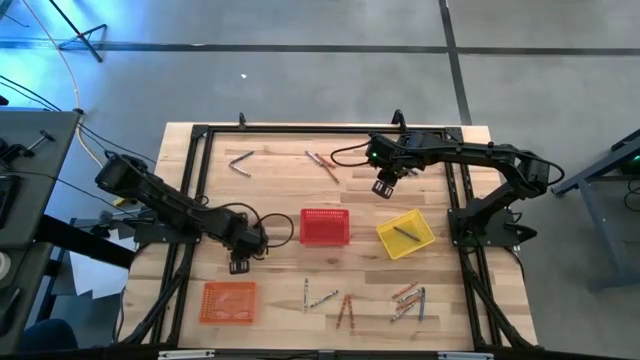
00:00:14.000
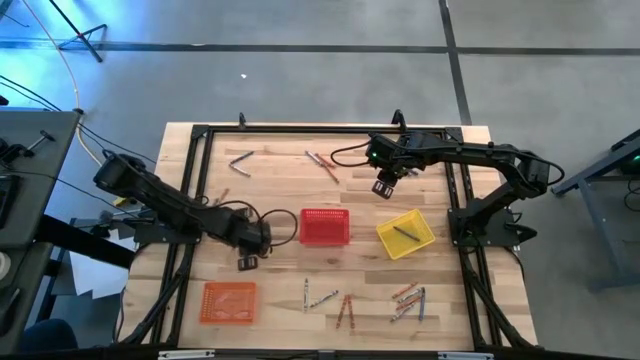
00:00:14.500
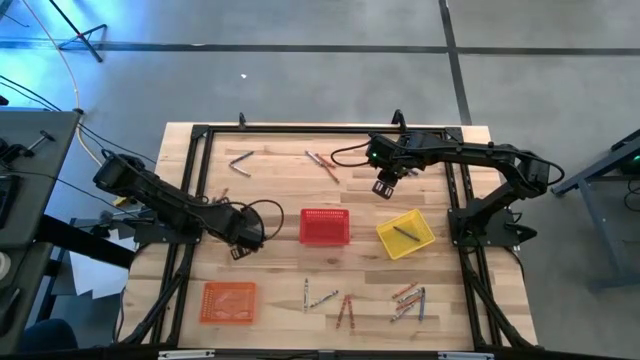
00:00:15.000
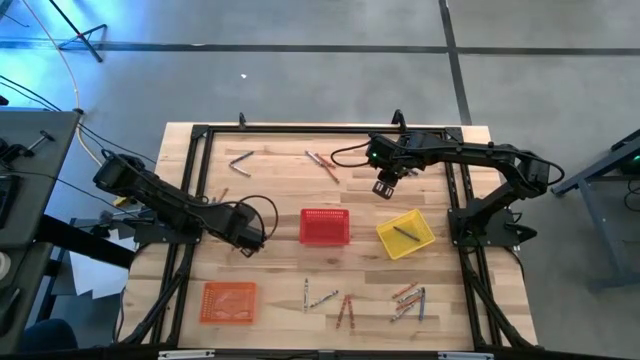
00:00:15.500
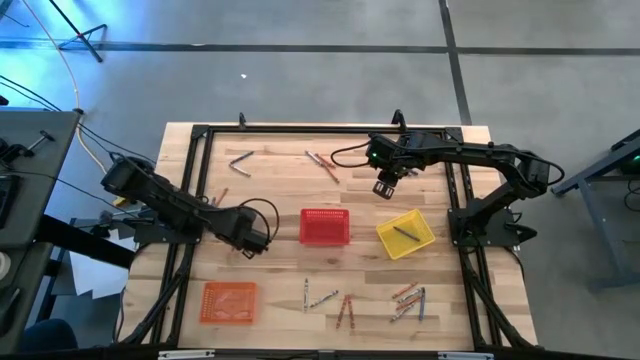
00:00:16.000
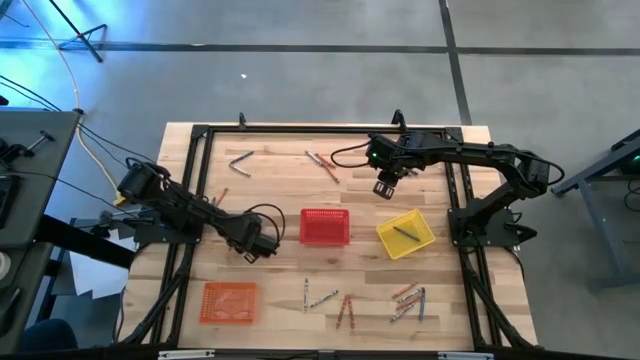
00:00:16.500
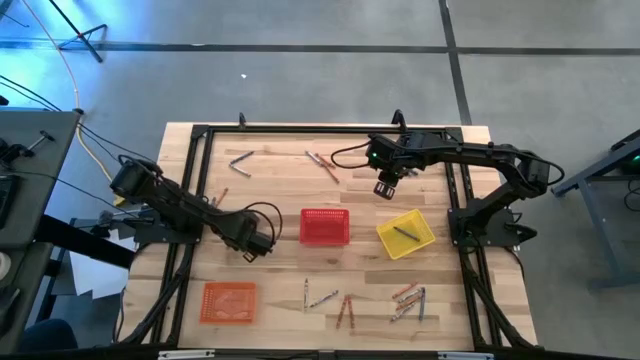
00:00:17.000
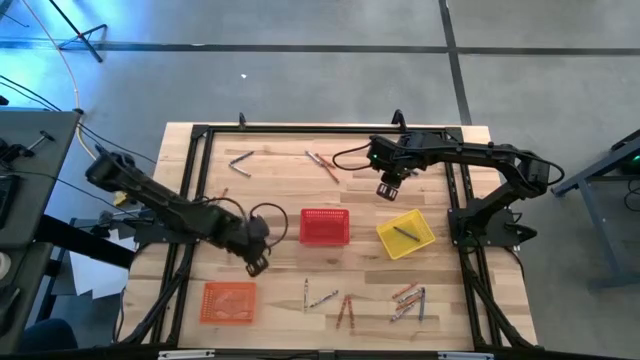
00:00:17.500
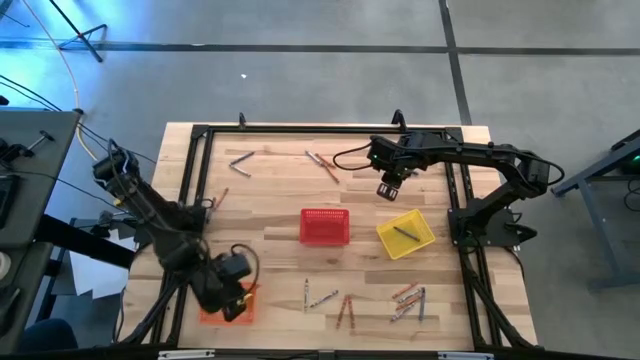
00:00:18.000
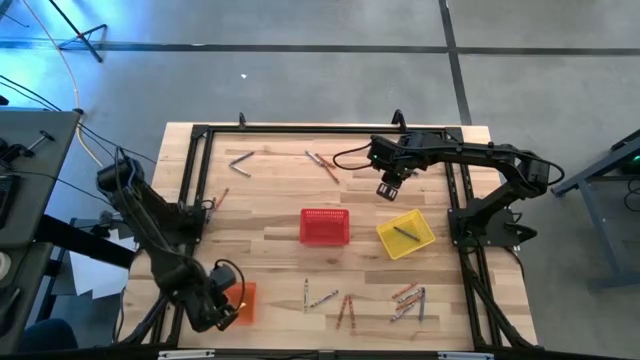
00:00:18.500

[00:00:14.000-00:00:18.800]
Task: Sort crayons
Put the orange crayon into the orange bin

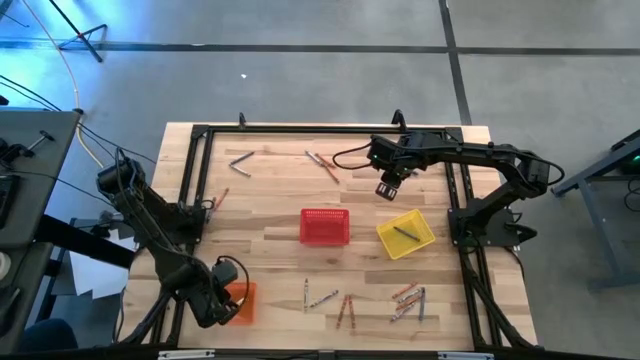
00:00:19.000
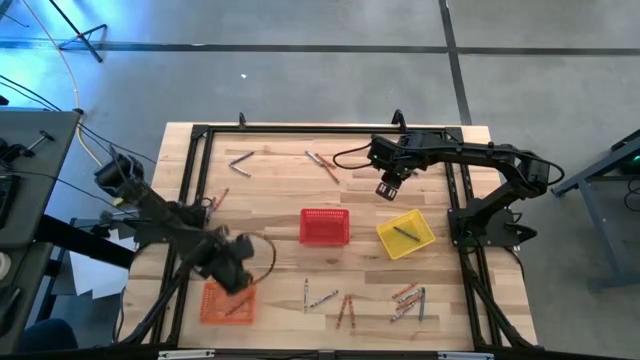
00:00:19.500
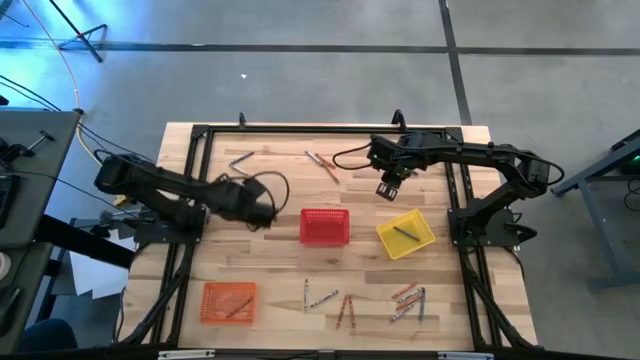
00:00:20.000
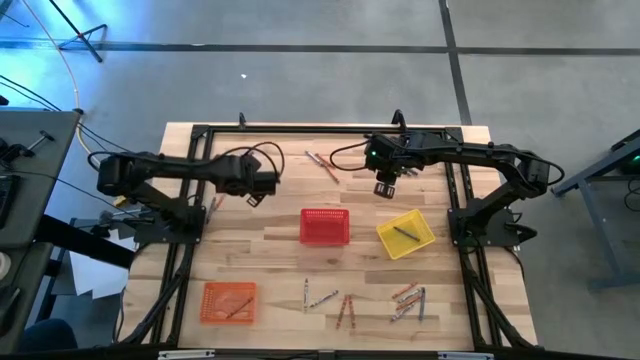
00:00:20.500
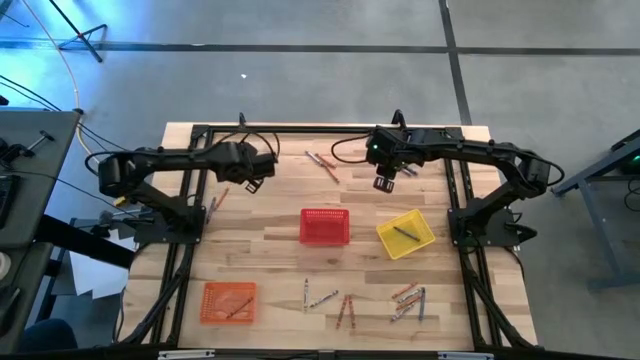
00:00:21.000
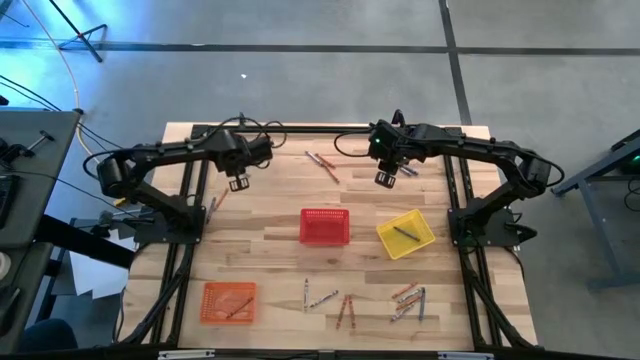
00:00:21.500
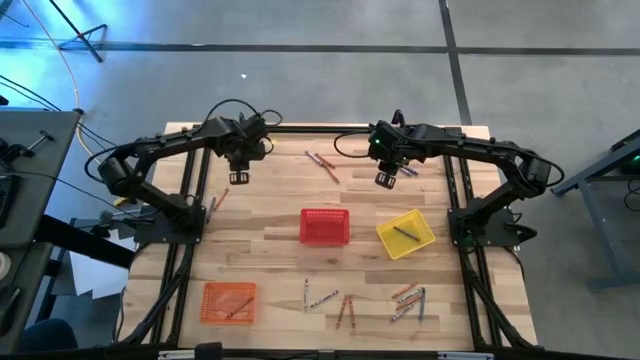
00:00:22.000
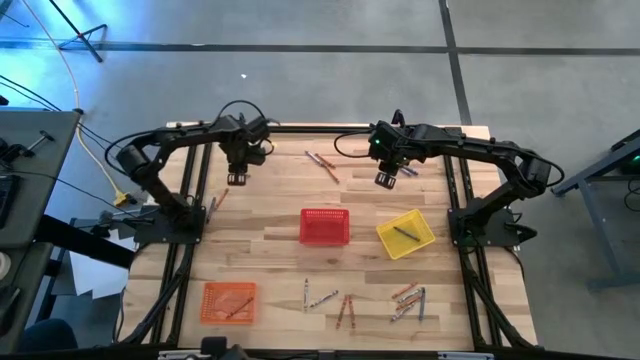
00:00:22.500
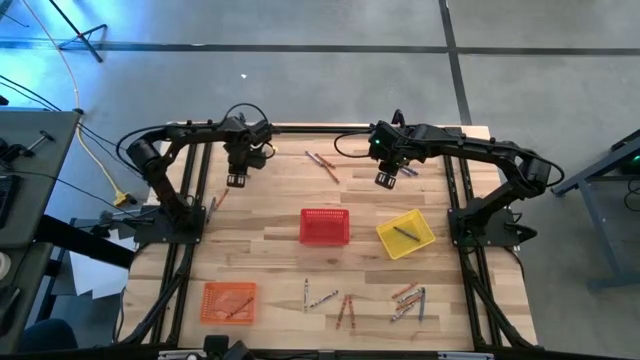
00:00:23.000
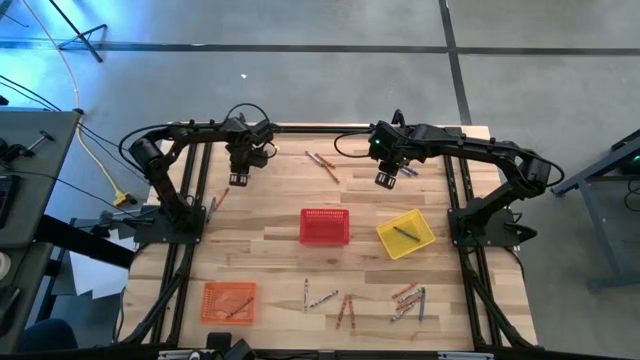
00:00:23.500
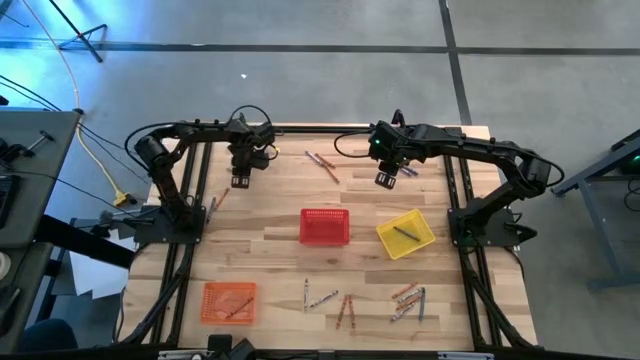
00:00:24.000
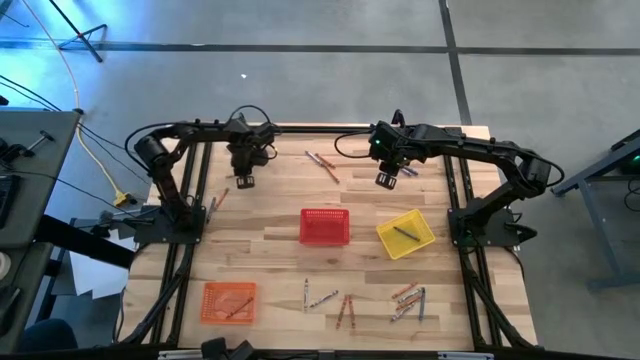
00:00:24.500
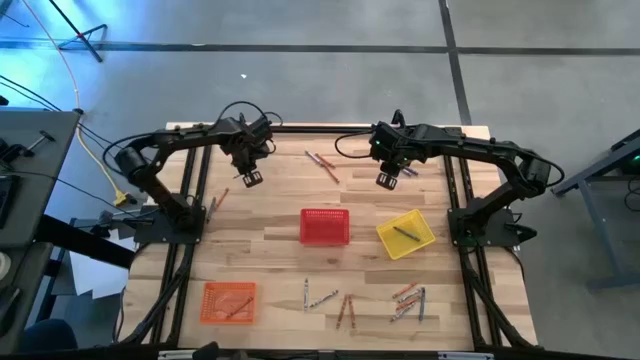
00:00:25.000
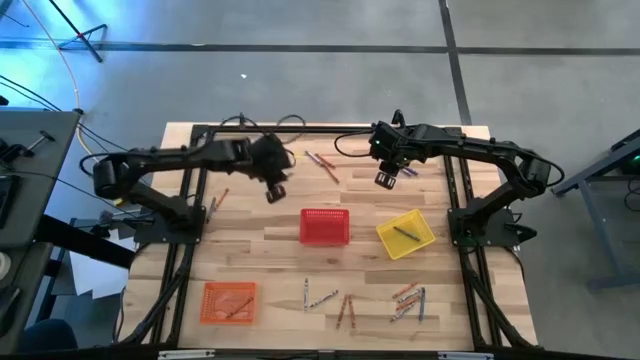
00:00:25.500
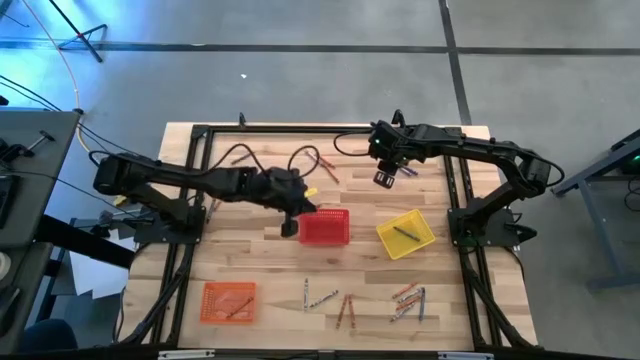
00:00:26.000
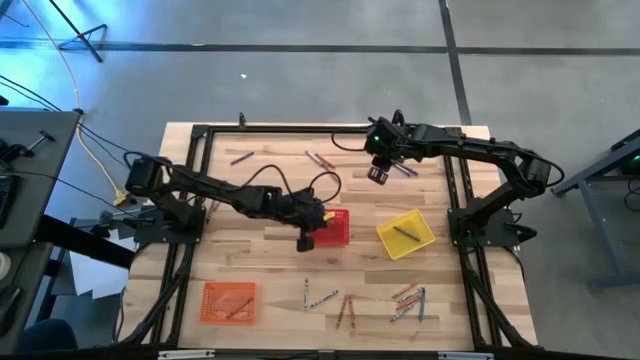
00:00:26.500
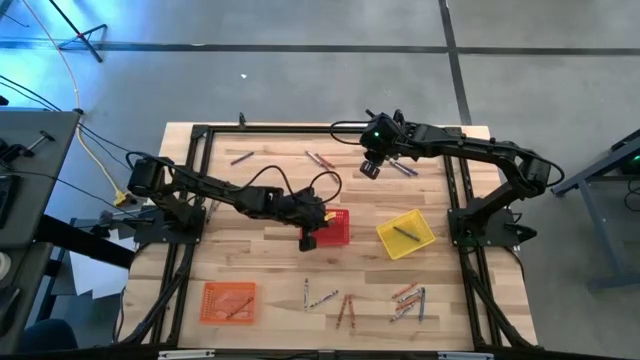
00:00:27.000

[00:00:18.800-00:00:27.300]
Put the gray crayon into the red bin

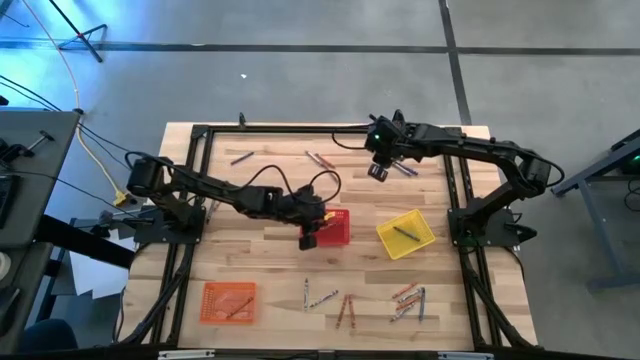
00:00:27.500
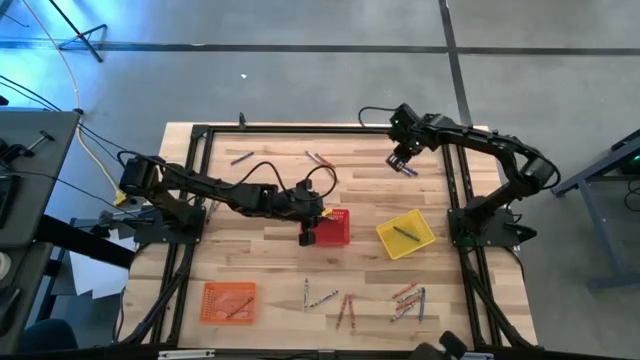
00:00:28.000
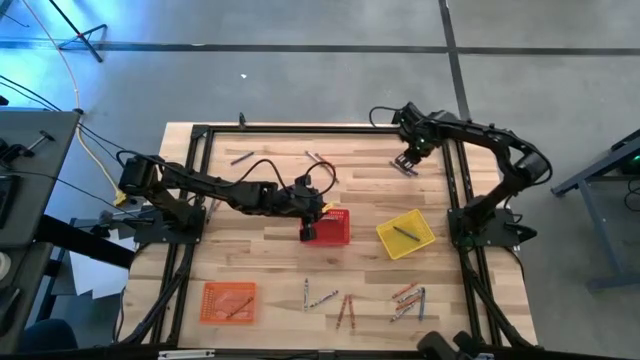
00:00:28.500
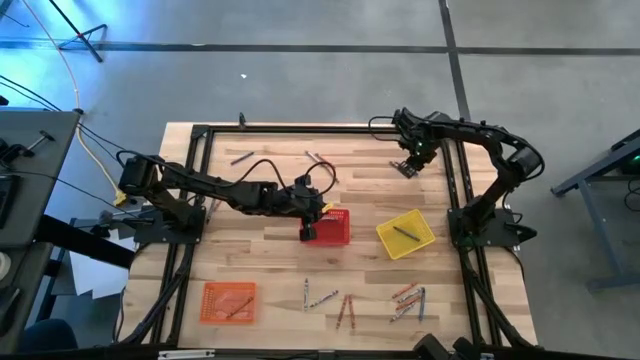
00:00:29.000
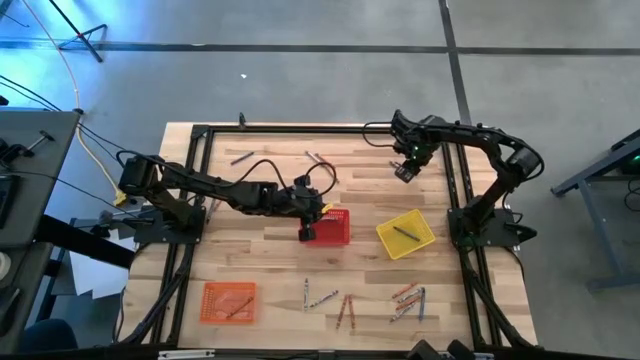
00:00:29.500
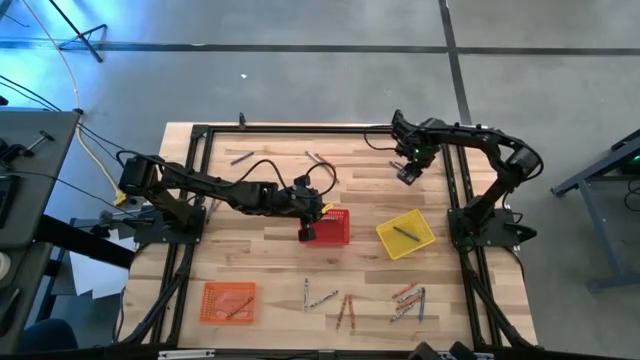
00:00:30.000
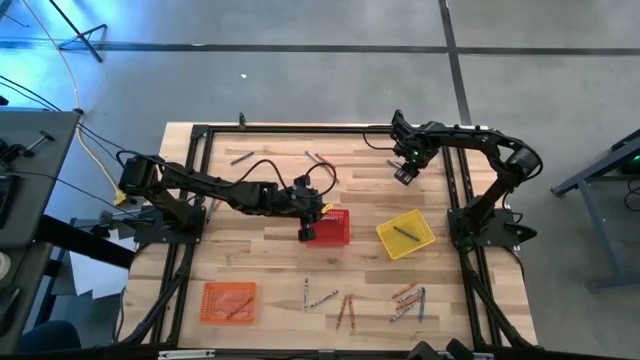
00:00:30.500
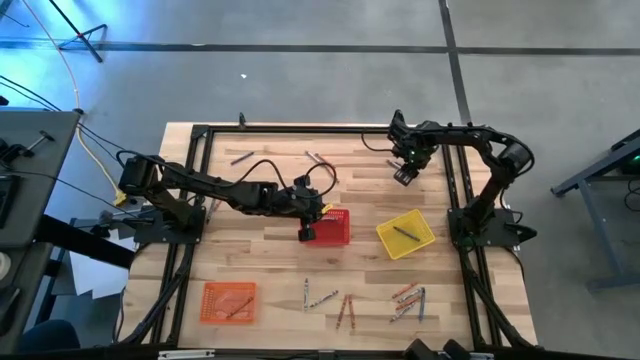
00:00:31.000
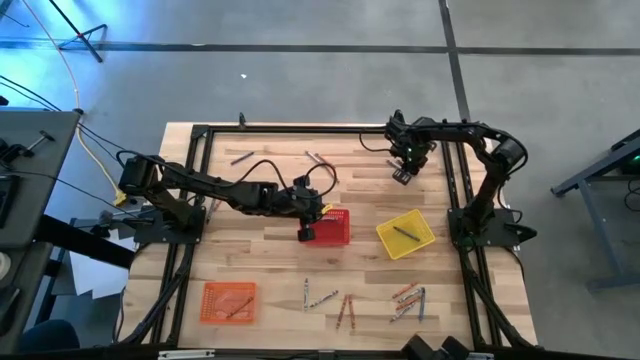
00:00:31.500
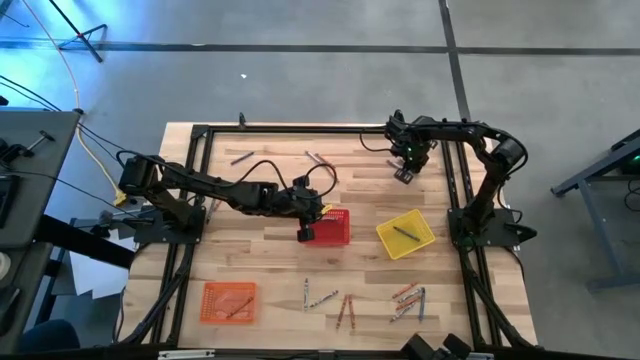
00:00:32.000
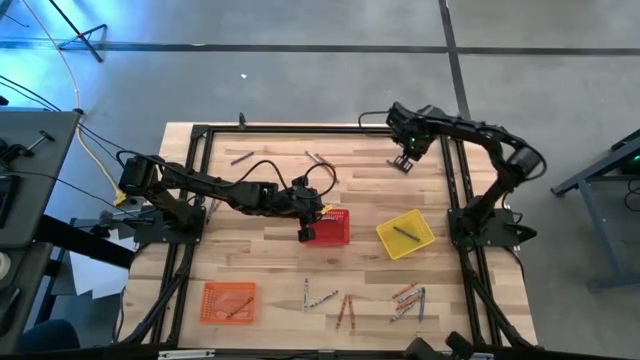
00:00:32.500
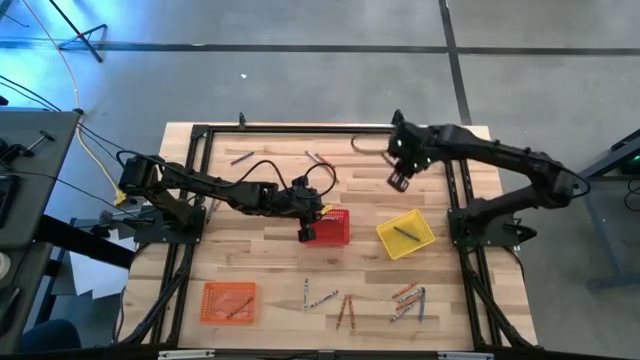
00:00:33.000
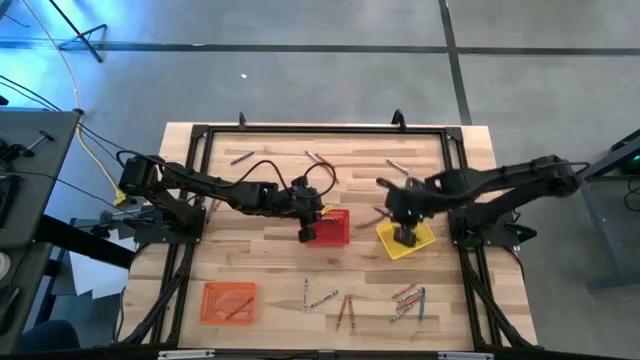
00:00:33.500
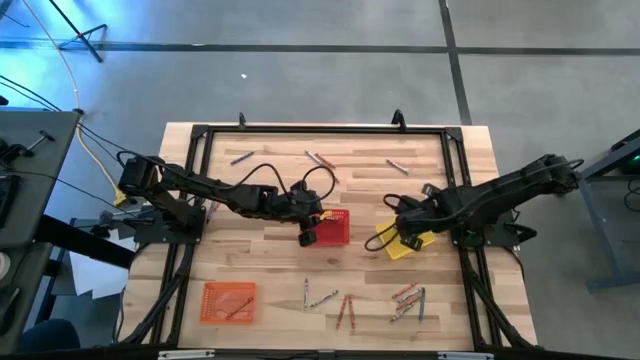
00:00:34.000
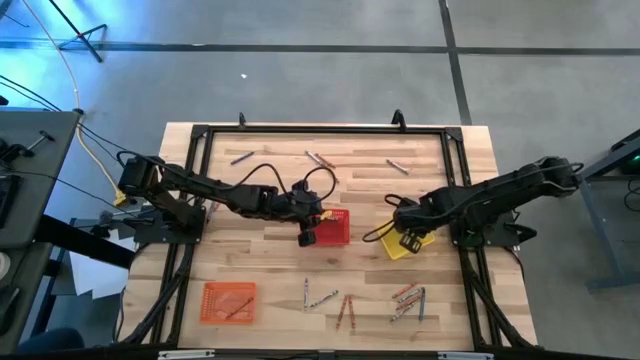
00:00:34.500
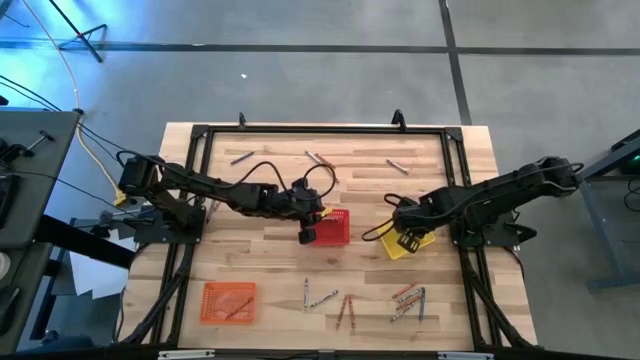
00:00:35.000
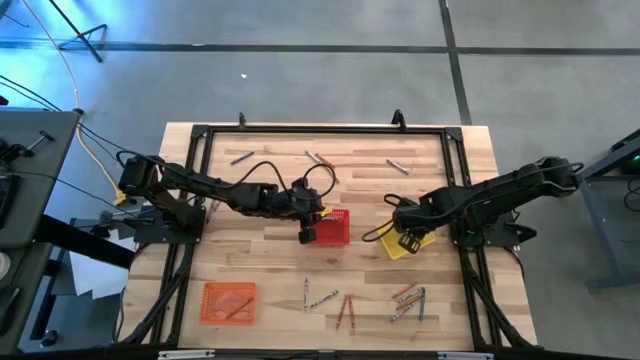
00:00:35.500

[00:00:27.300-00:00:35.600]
Put the blue crayon into the yellow bin
